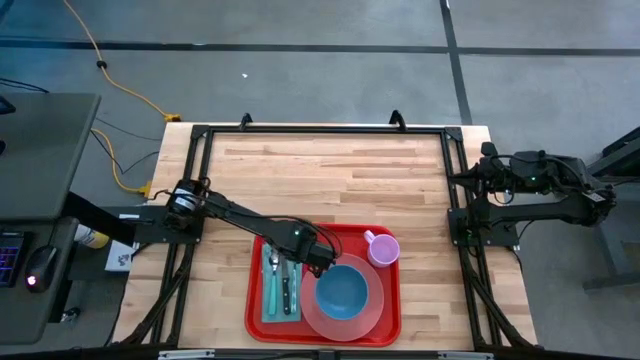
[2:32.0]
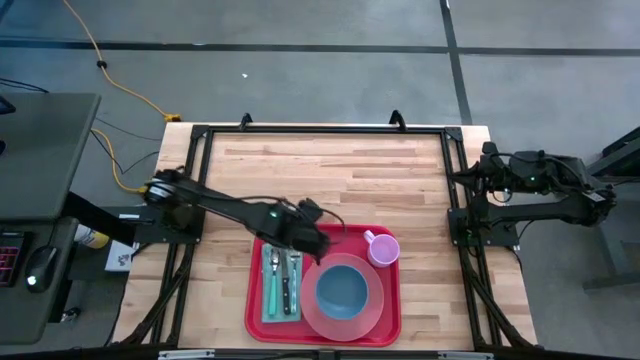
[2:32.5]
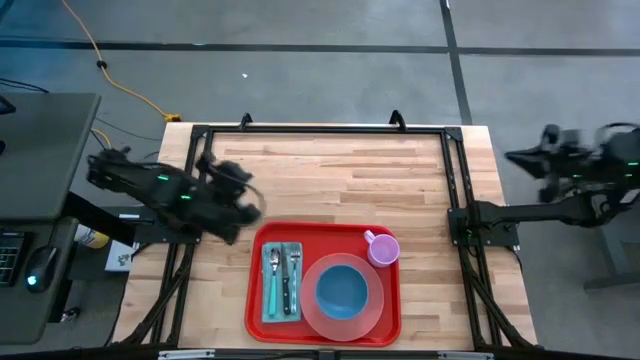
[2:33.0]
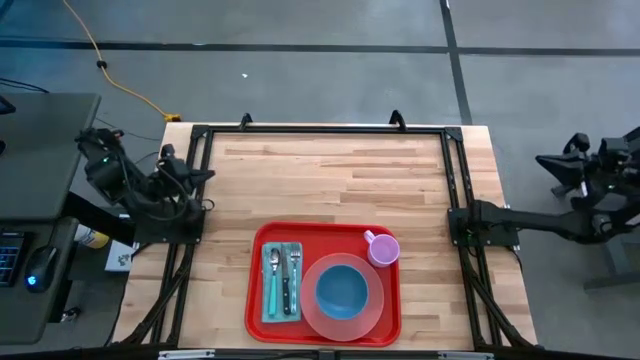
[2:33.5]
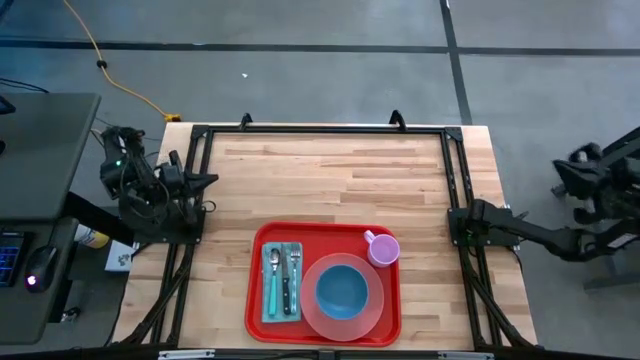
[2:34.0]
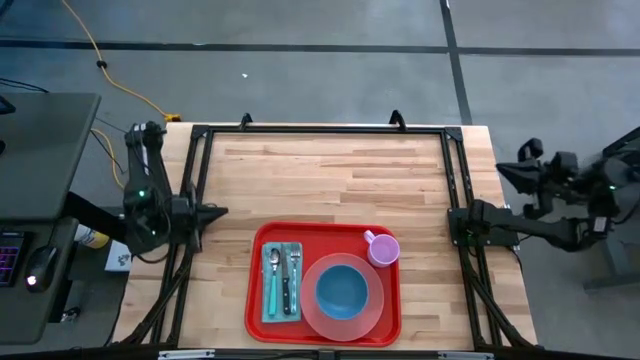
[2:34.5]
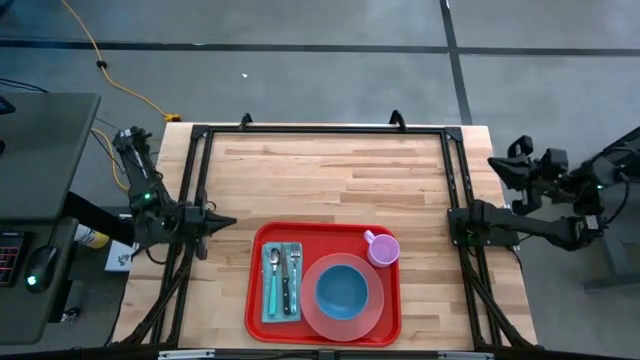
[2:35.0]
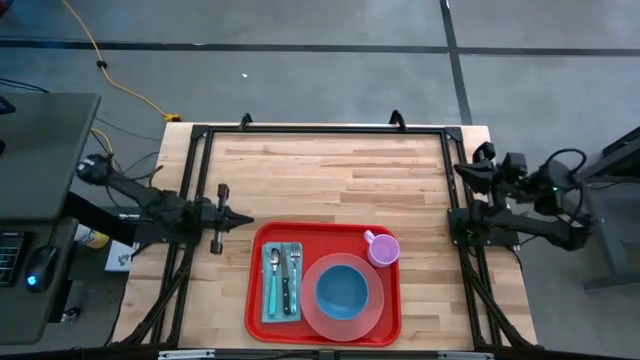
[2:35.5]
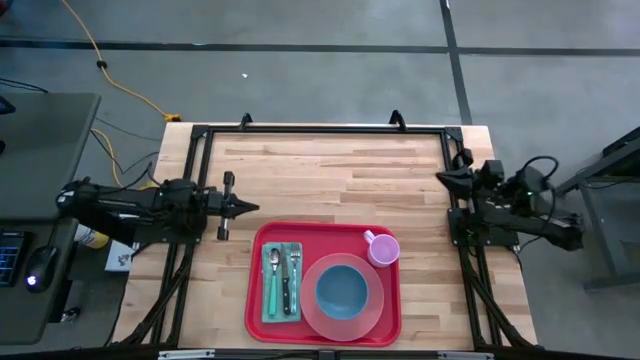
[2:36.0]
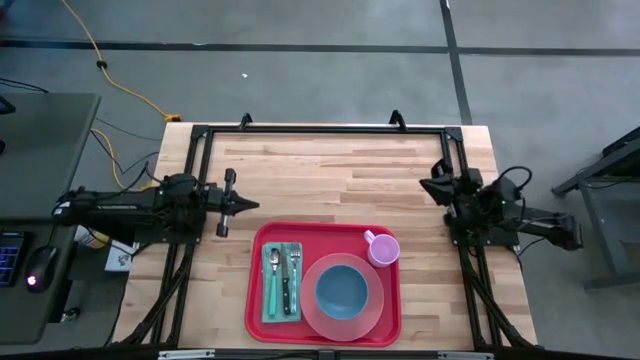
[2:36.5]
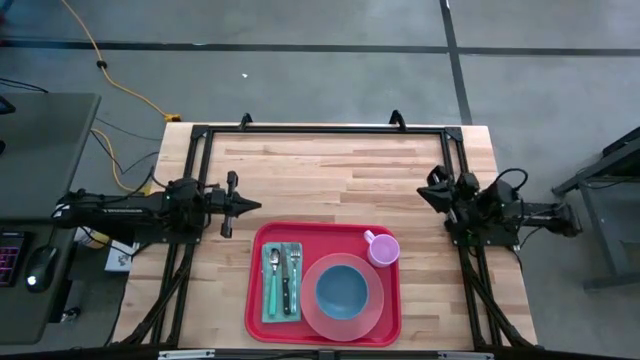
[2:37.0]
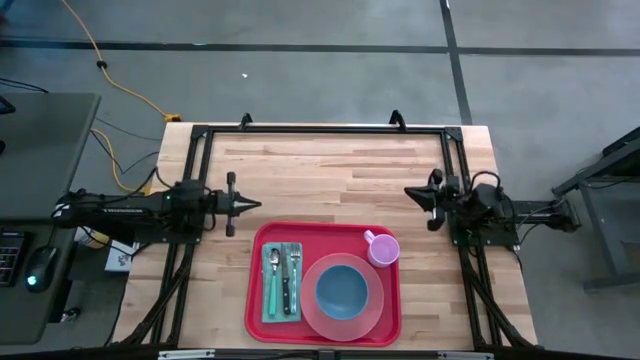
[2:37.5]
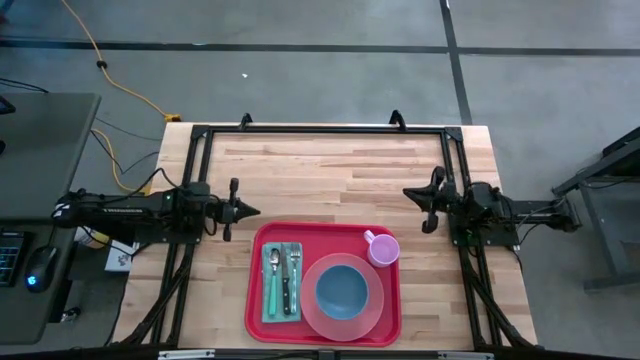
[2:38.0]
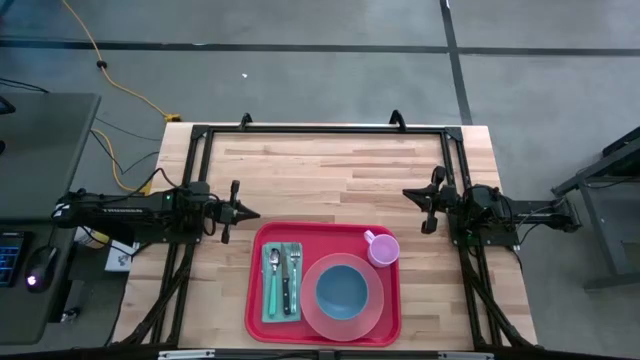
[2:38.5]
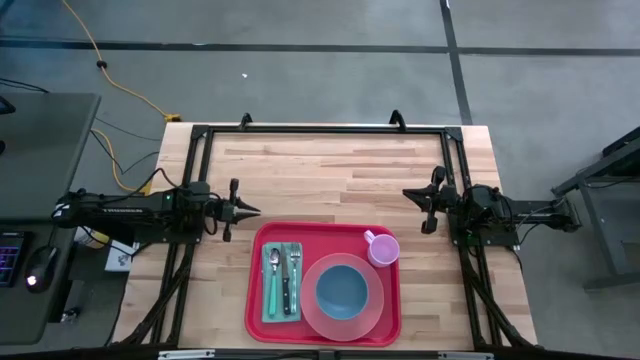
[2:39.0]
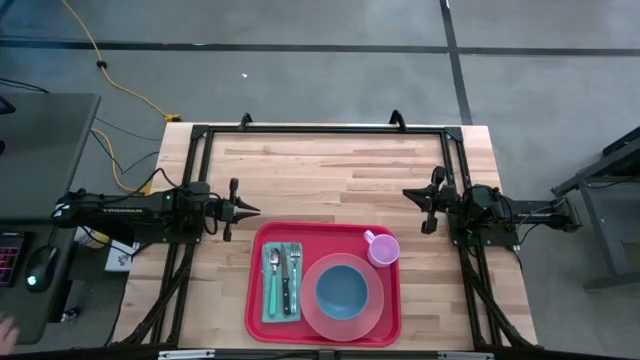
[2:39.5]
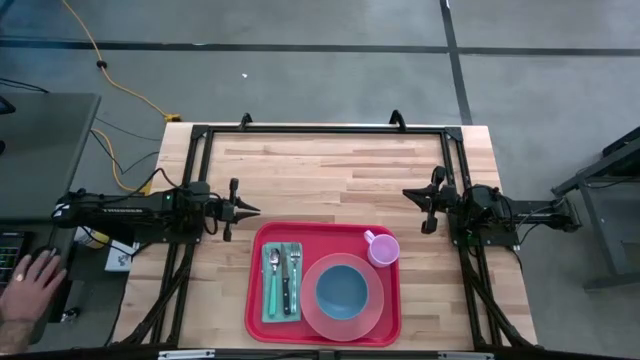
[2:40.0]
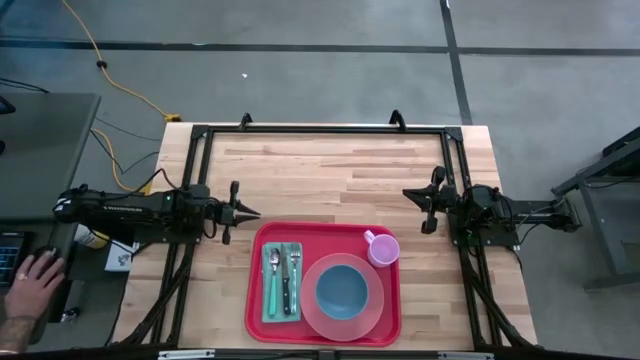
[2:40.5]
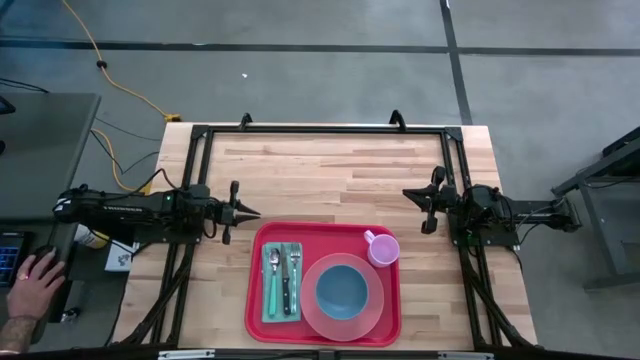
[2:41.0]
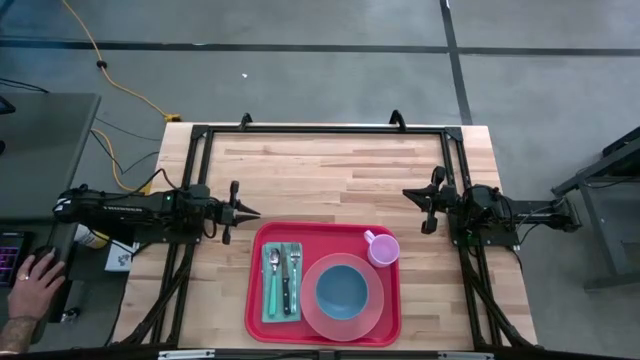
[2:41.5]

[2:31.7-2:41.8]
Task: Set up tray
Return to Home Position

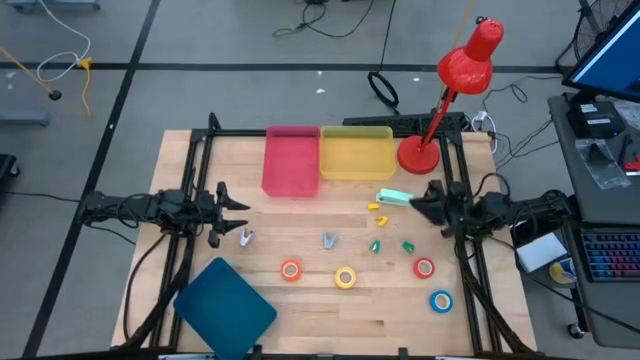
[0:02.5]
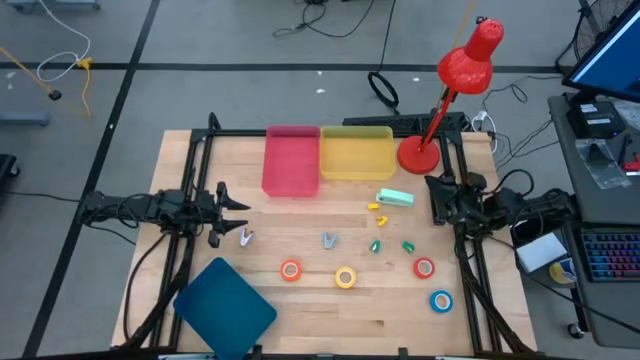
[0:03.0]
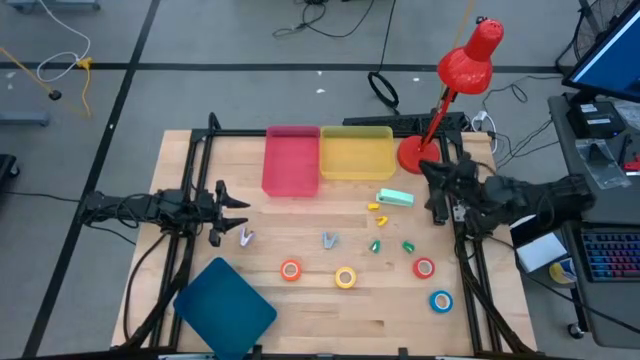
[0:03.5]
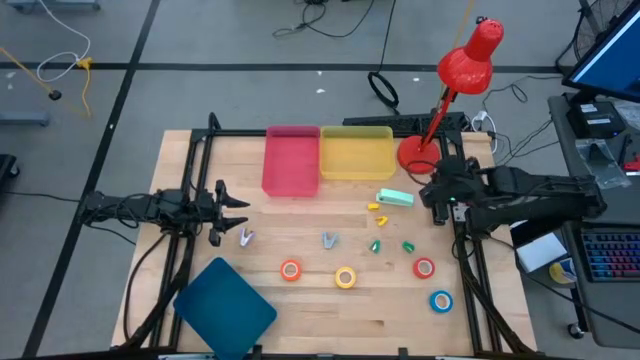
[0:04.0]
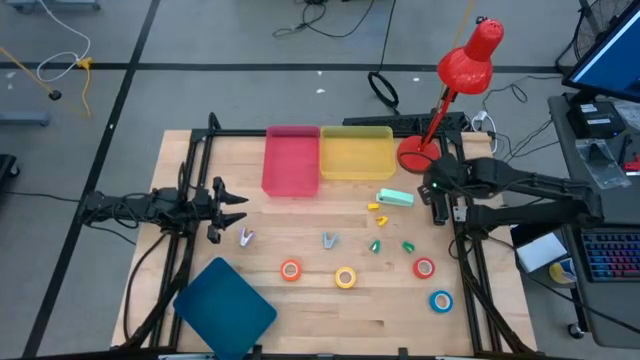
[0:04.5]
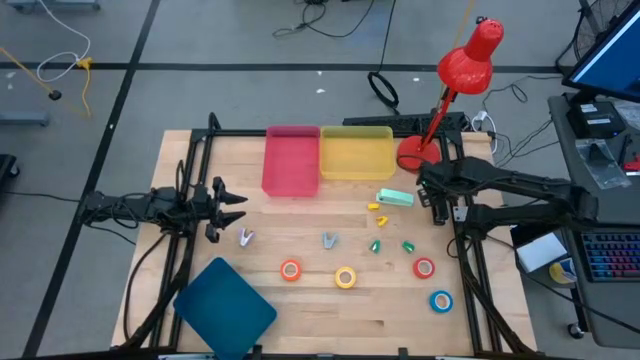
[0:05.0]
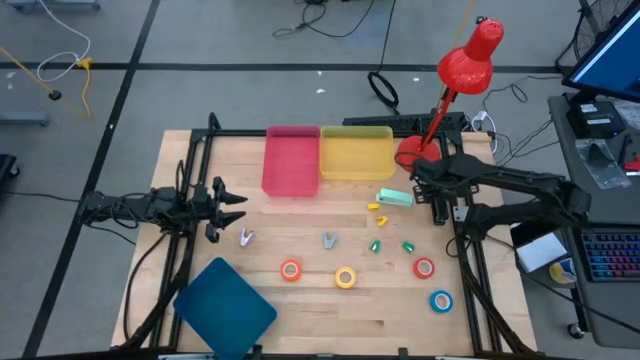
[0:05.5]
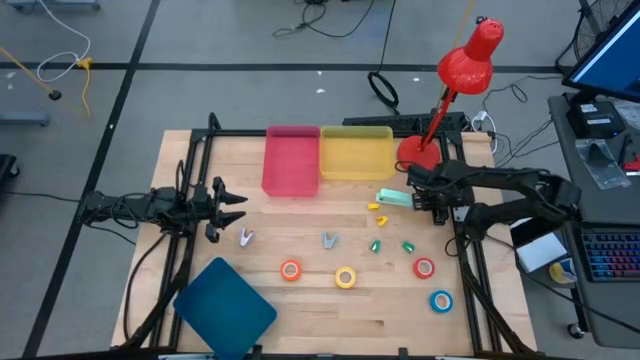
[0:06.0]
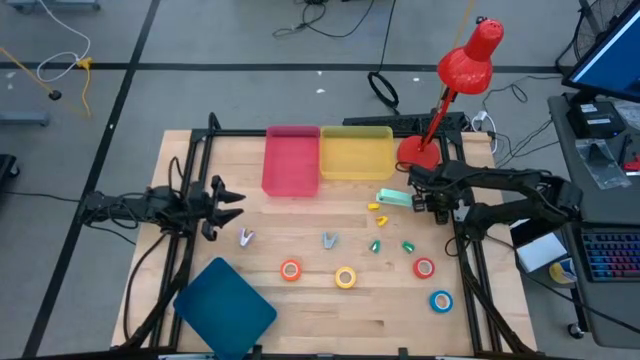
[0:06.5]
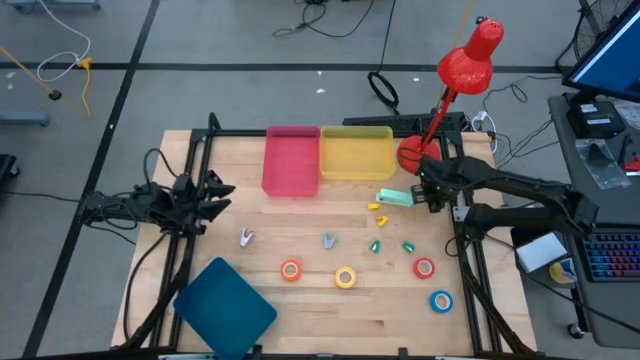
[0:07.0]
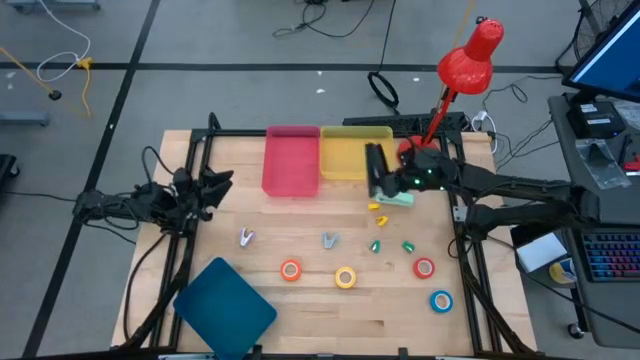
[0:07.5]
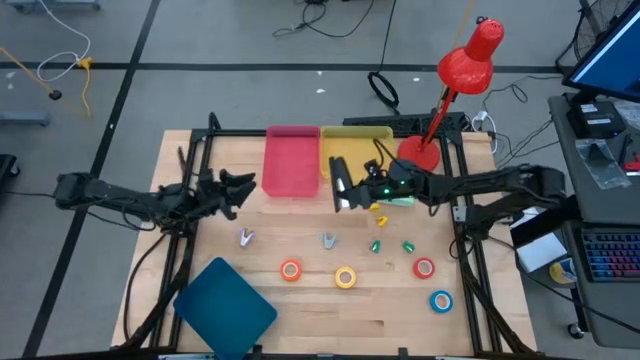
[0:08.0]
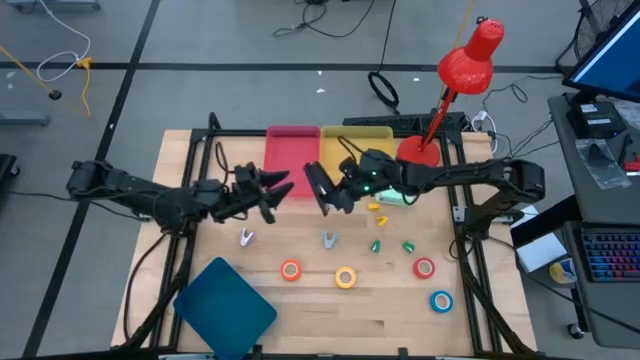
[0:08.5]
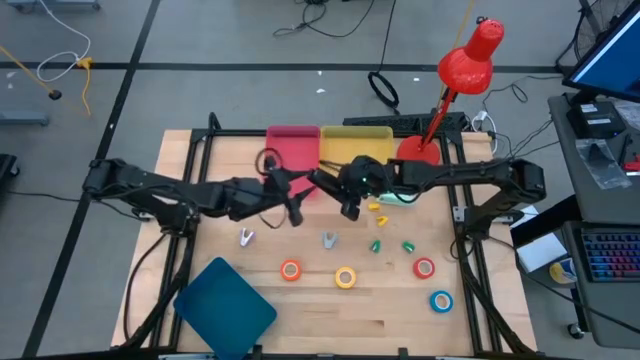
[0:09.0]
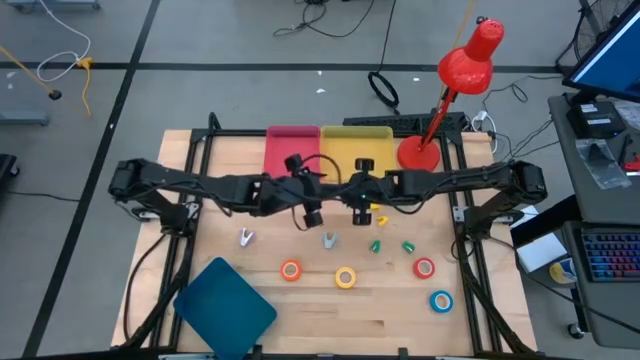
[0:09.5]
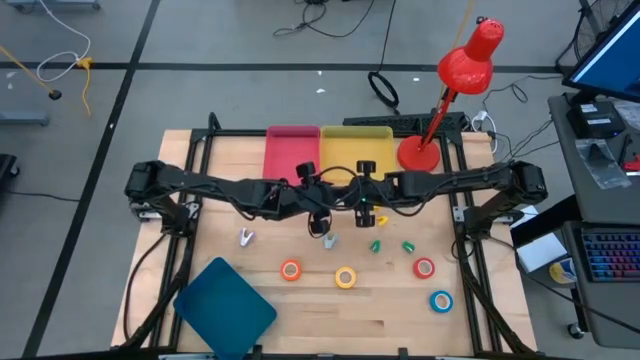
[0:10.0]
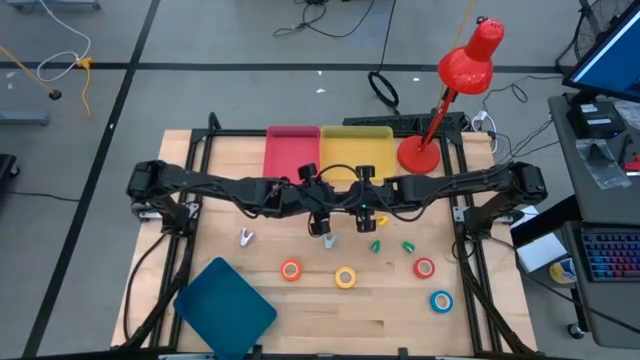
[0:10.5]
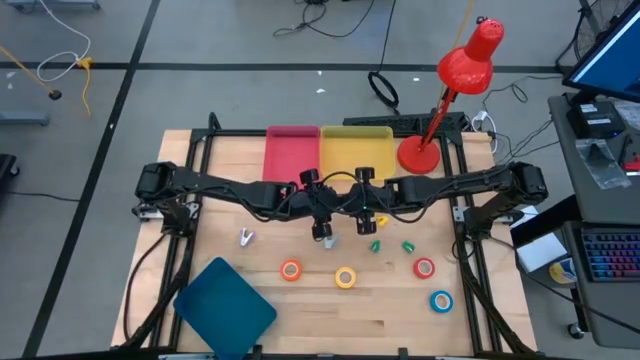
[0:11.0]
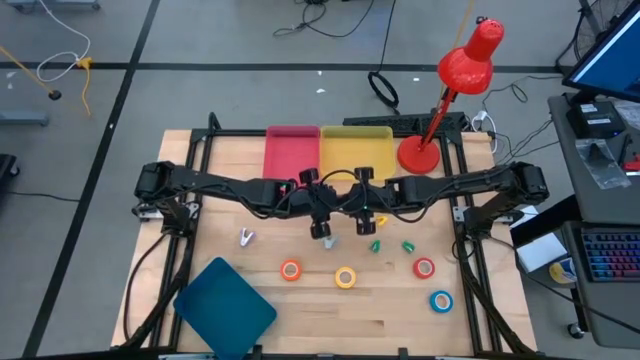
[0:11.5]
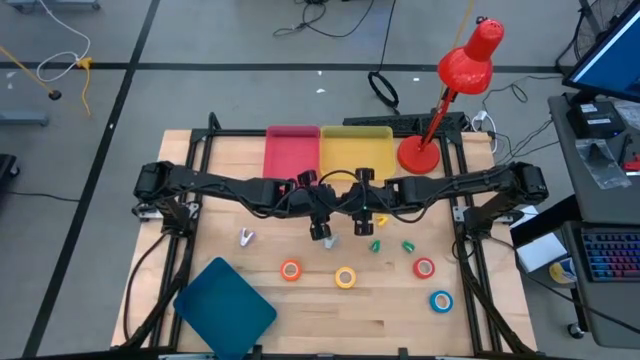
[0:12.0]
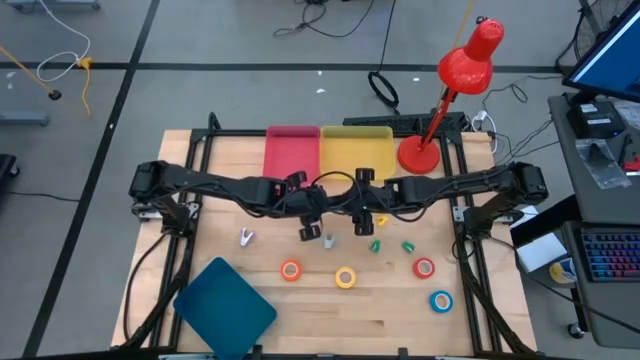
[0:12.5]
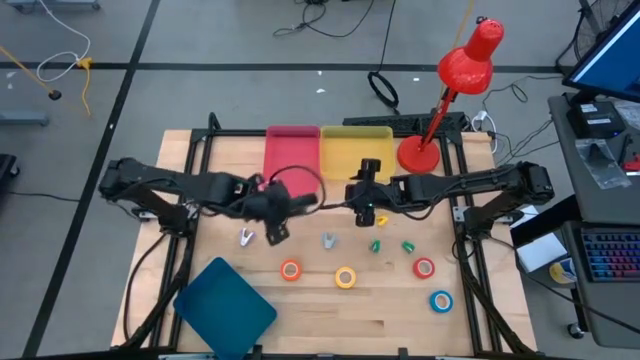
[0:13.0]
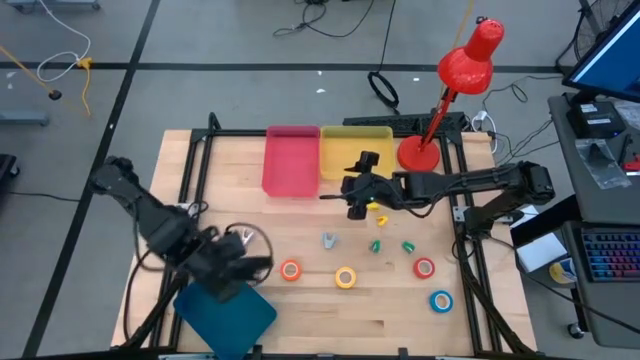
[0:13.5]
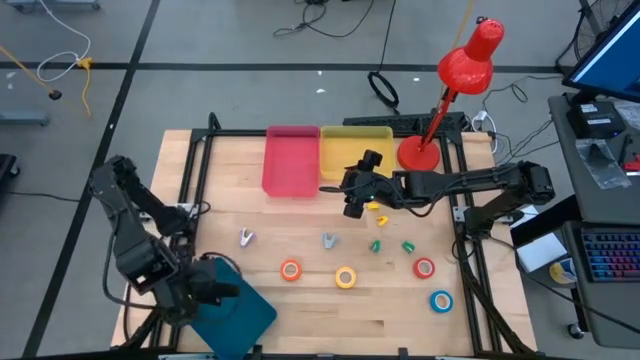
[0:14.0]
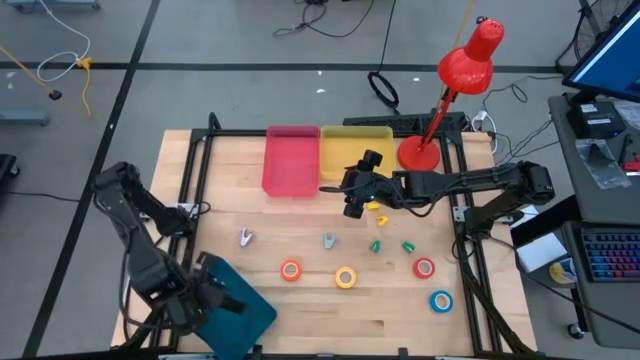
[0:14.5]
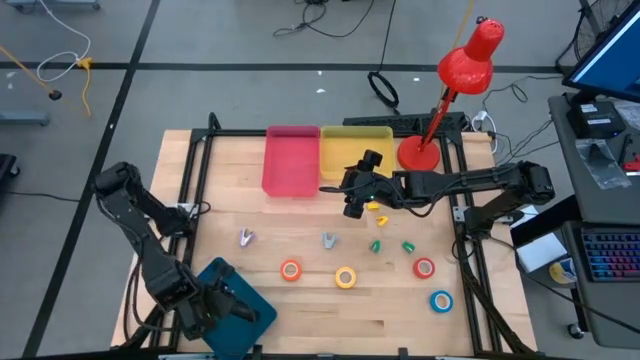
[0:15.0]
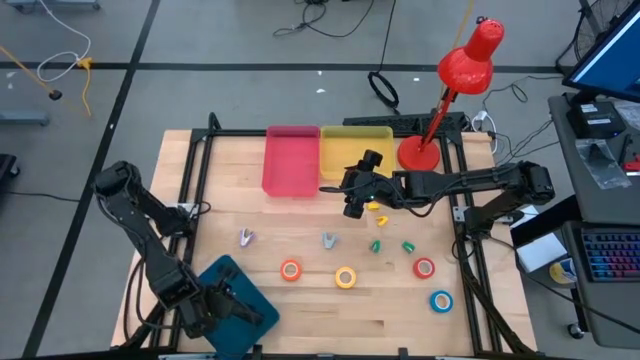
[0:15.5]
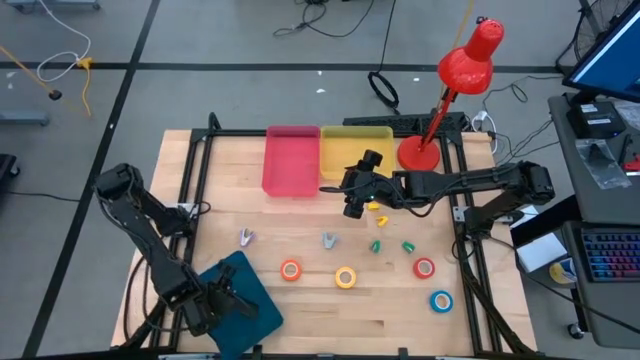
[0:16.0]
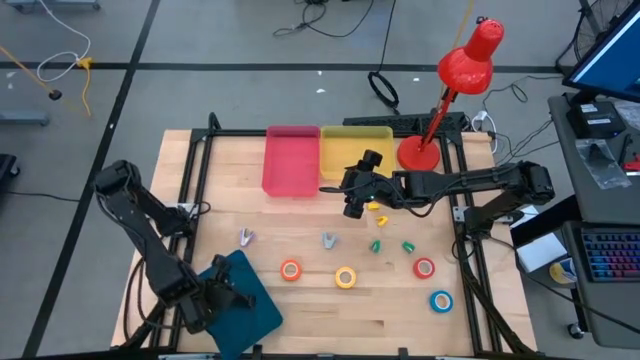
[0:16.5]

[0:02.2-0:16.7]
Task: Pick and place Stapler, Stapler remover, tape
Put the large black stapler into the blue bin
